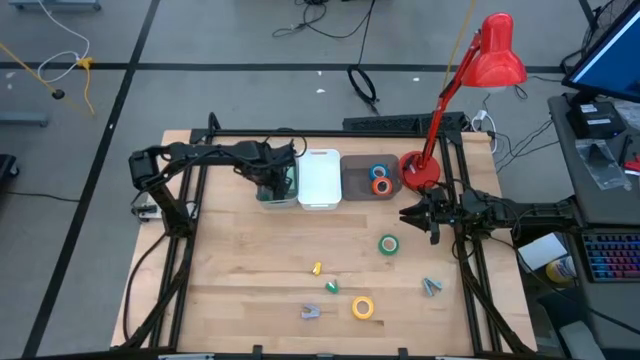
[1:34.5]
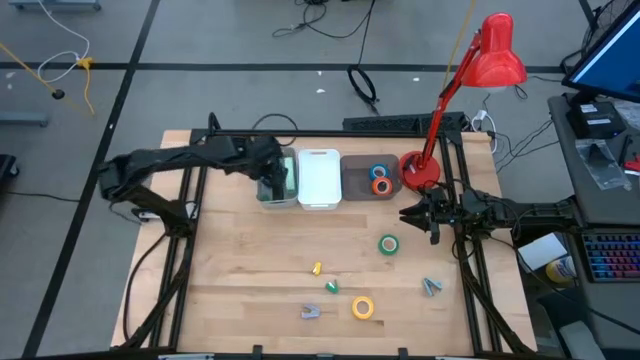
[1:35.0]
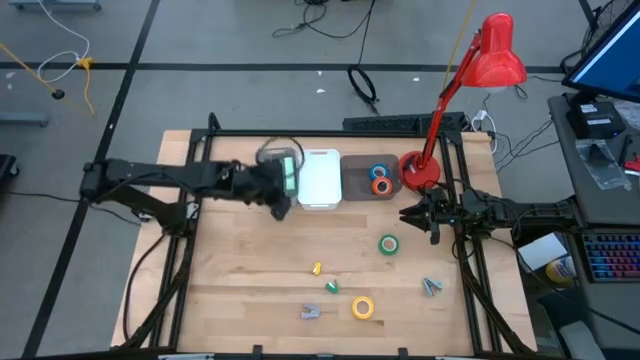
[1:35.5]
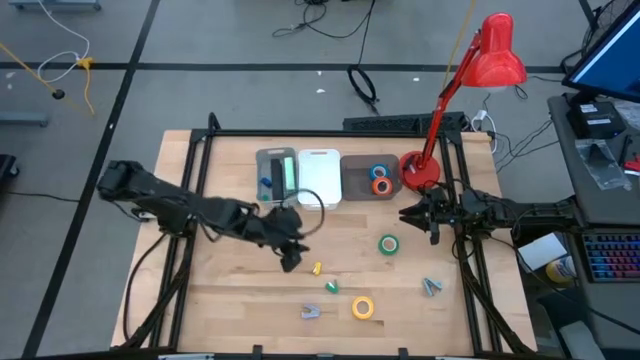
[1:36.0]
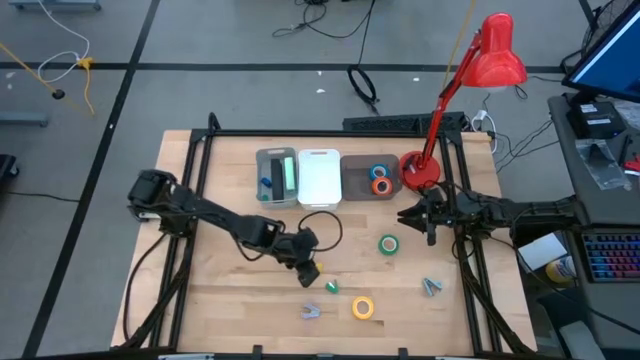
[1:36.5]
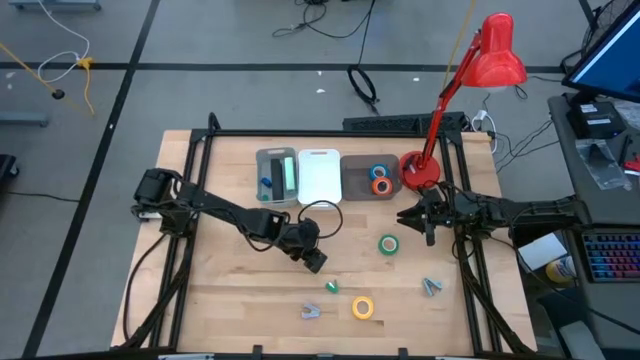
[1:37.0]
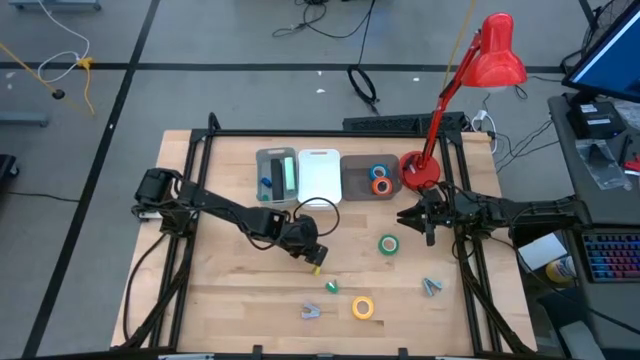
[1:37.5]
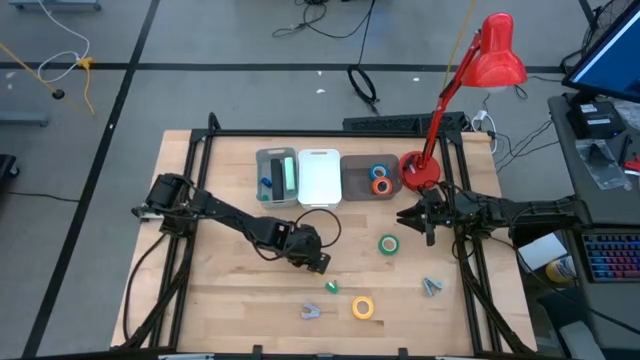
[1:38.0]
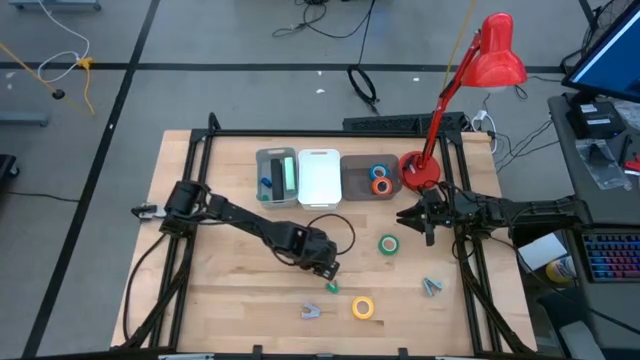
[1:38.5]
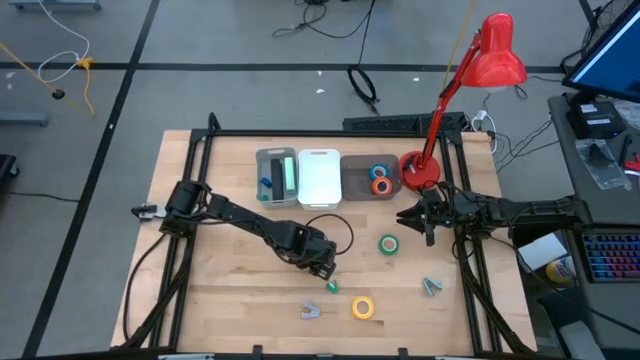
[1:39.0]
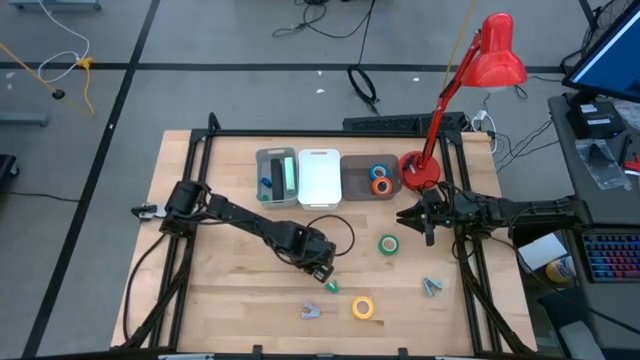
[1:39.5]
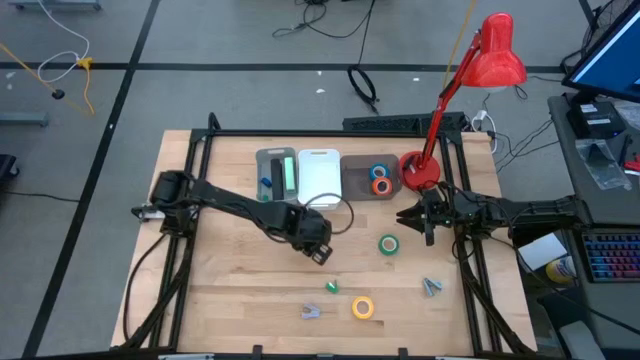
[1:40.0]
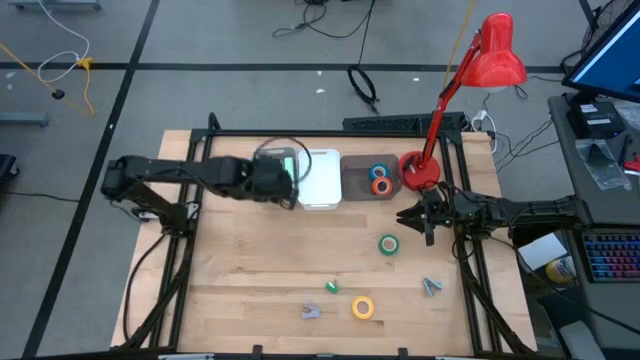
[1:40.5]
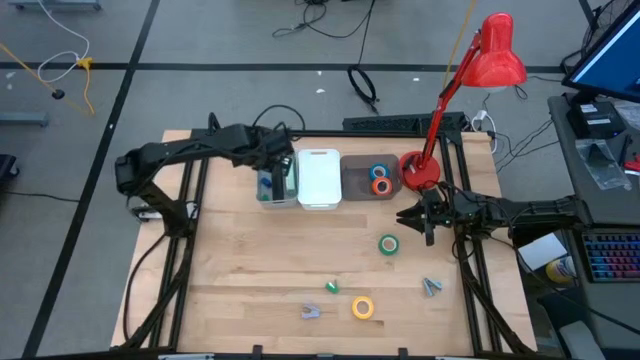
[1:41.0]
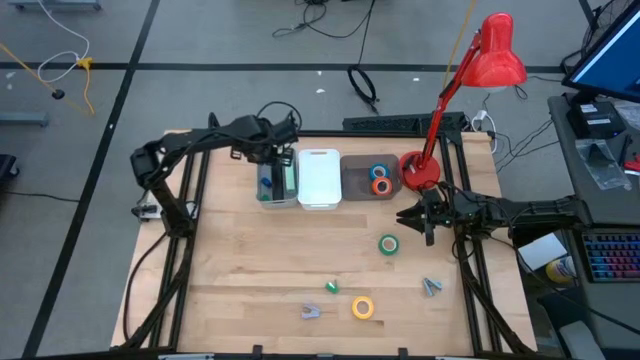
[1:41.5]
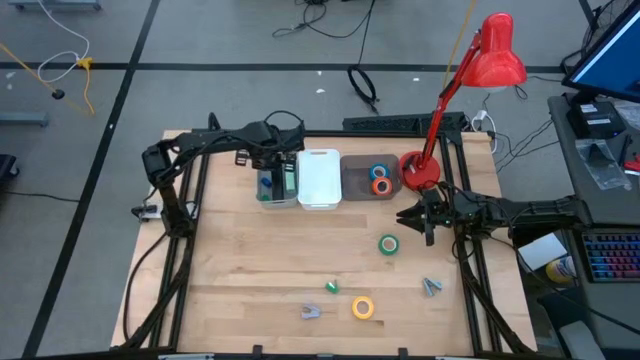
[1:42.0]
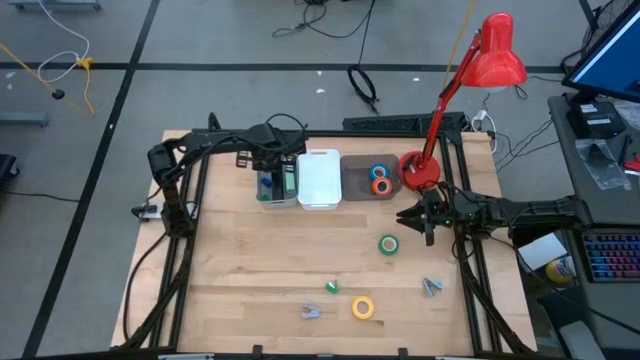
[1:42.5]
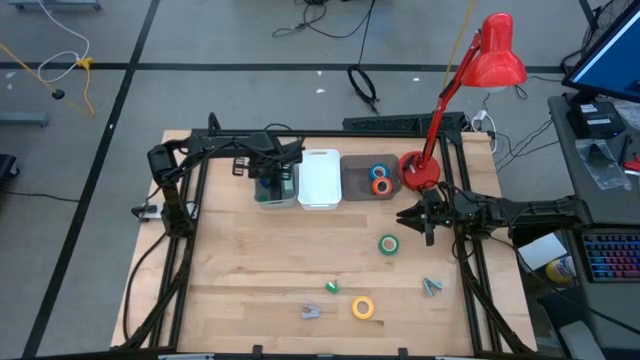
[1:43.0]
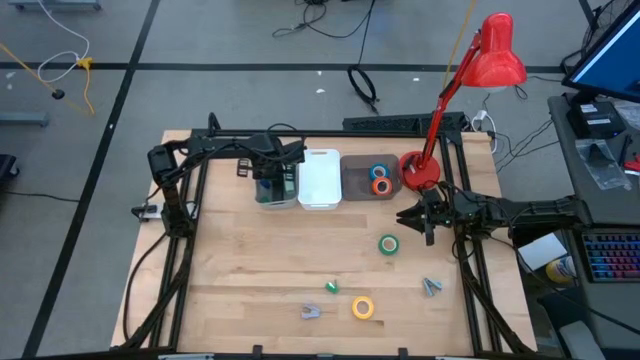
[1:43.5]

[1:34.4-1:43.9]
Task: Pick and place Stapler, Stapler remover, tape
Put the small yellow stapler into the grey bin

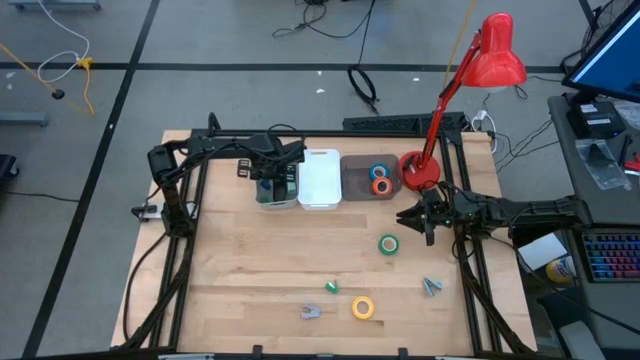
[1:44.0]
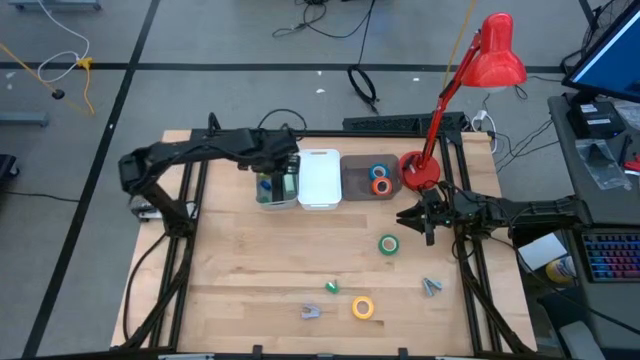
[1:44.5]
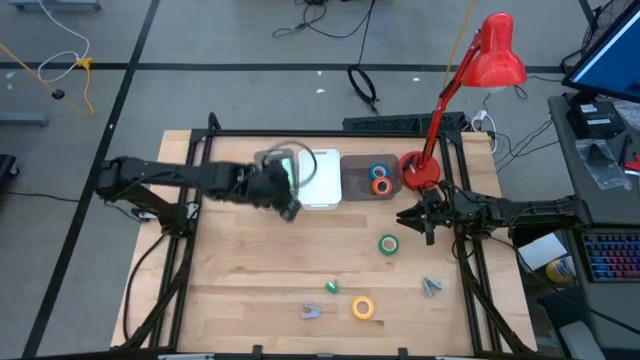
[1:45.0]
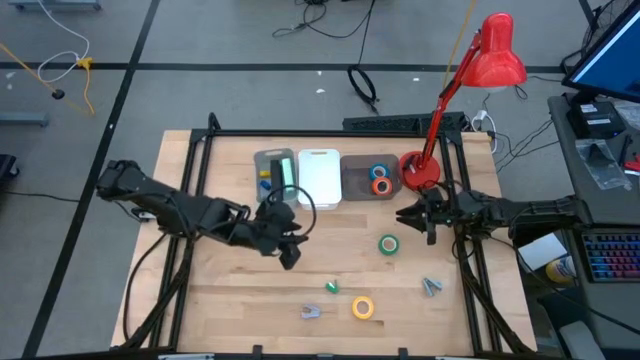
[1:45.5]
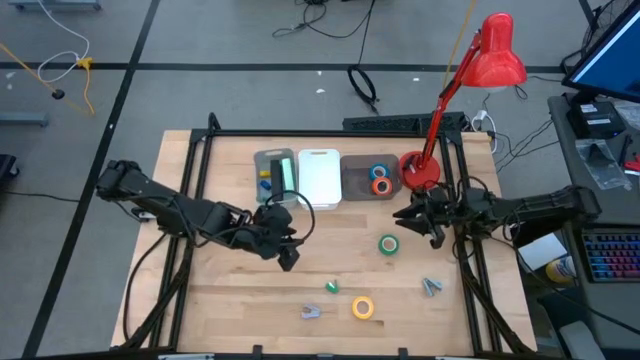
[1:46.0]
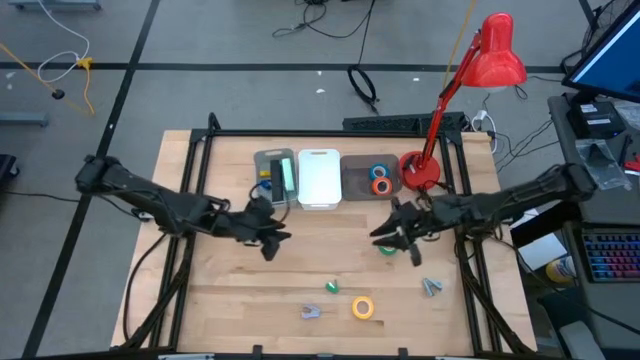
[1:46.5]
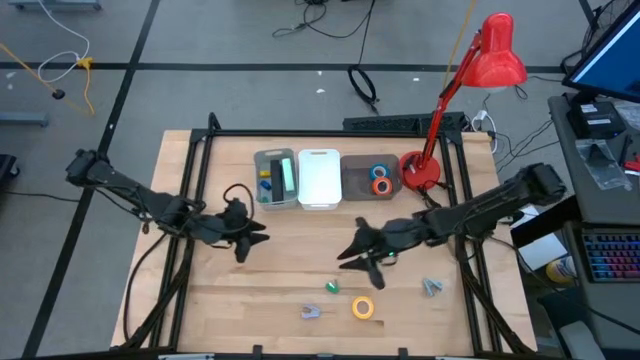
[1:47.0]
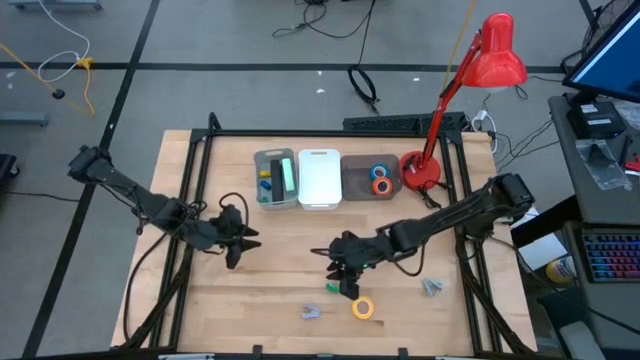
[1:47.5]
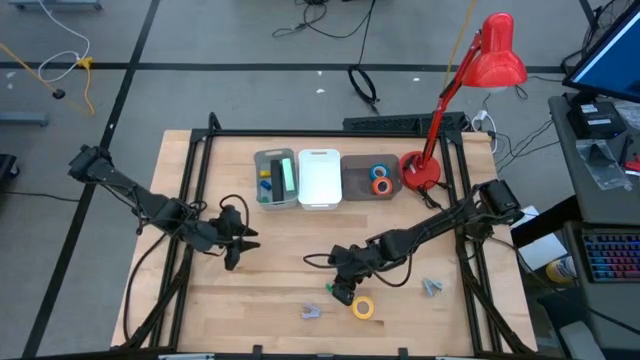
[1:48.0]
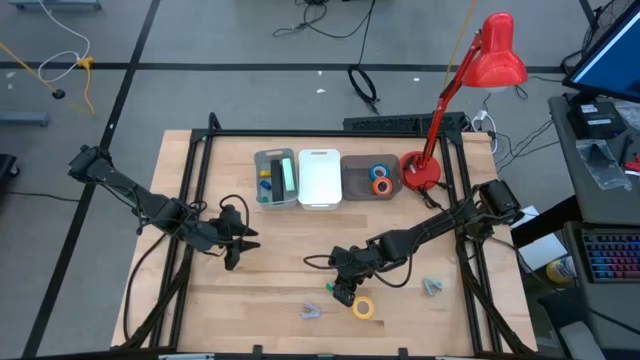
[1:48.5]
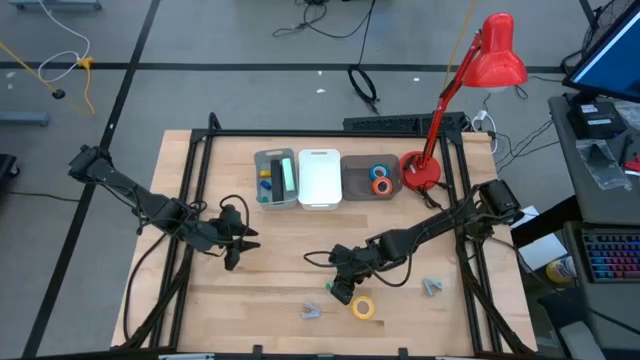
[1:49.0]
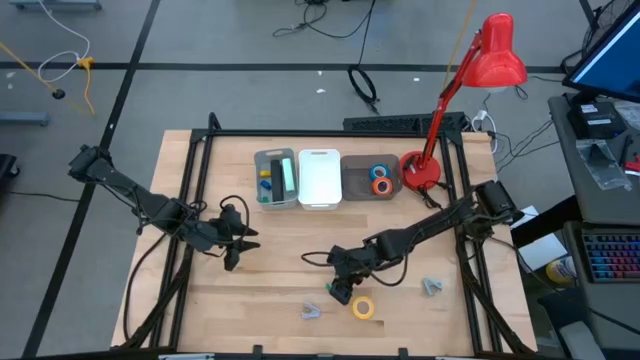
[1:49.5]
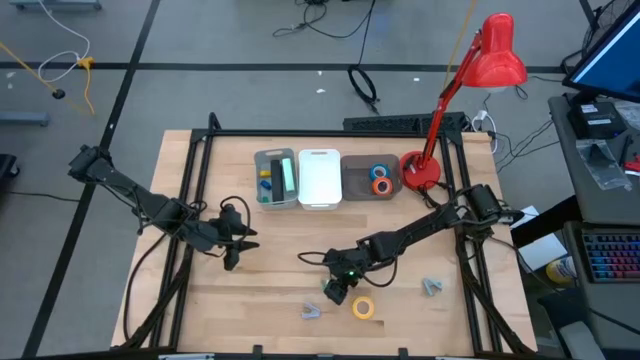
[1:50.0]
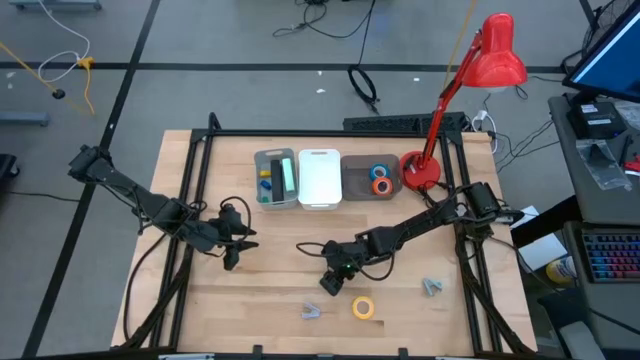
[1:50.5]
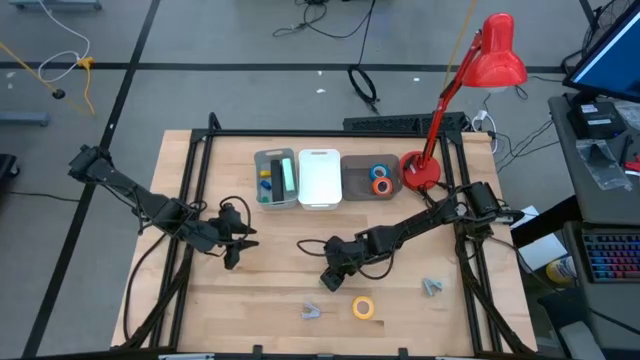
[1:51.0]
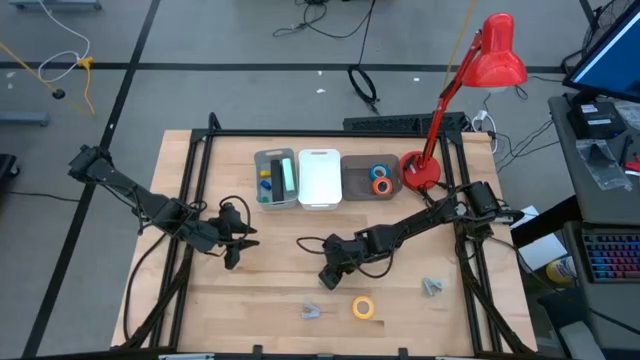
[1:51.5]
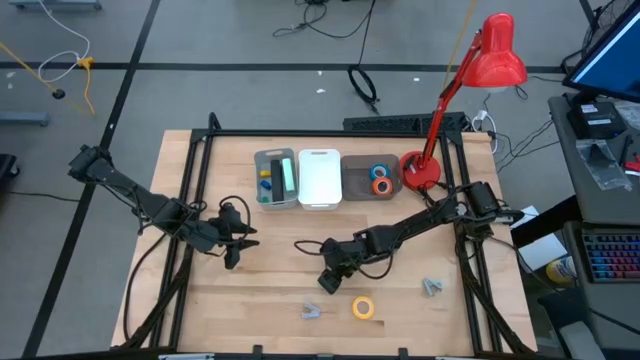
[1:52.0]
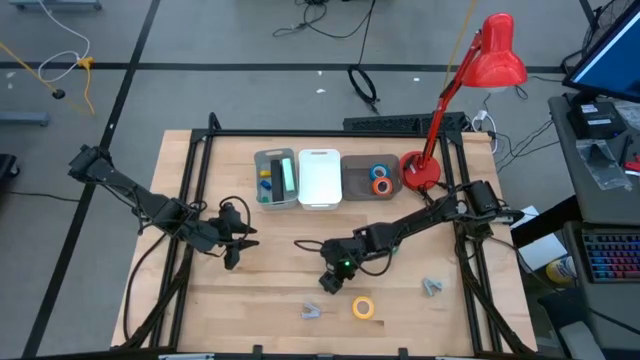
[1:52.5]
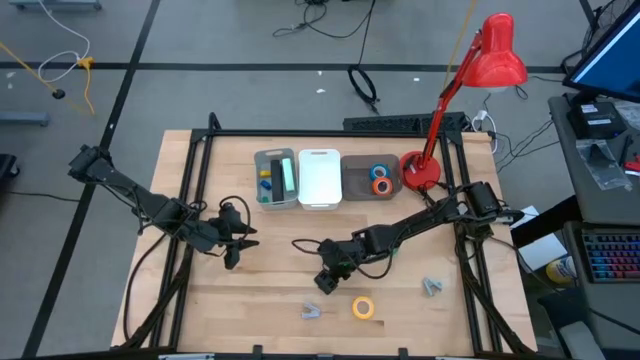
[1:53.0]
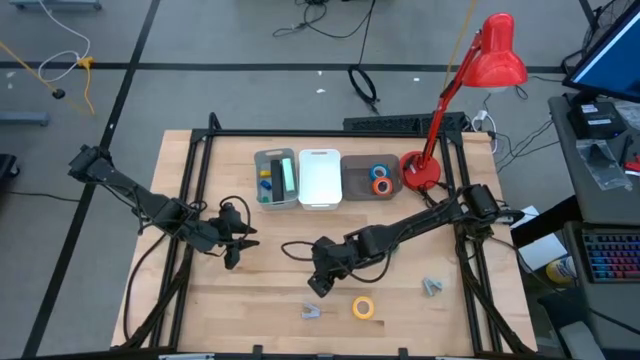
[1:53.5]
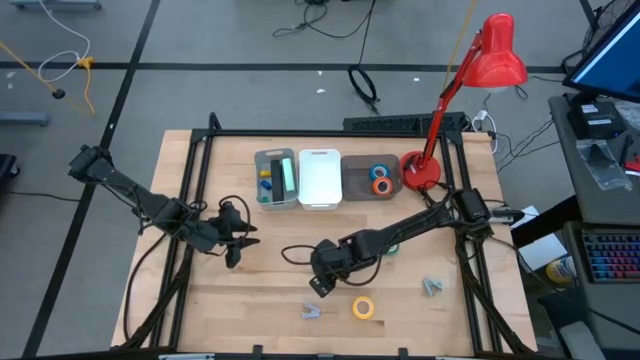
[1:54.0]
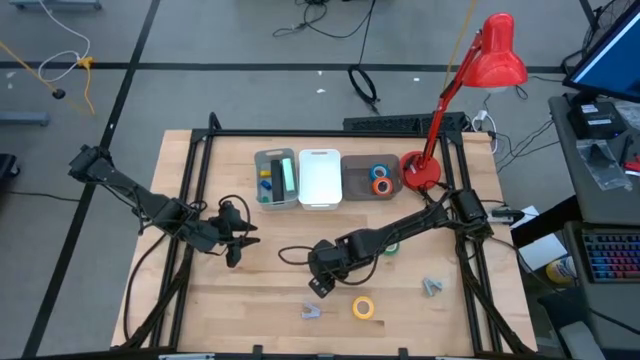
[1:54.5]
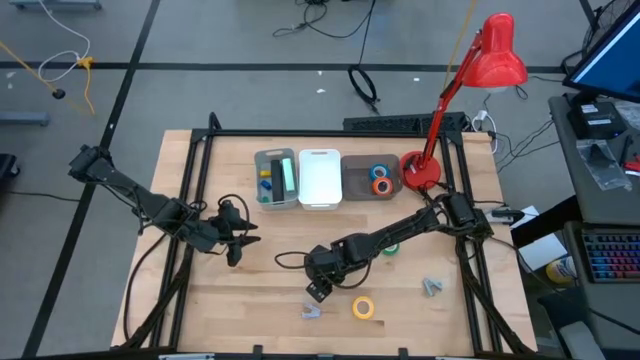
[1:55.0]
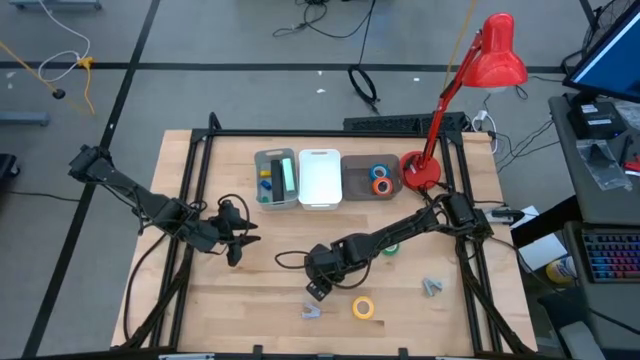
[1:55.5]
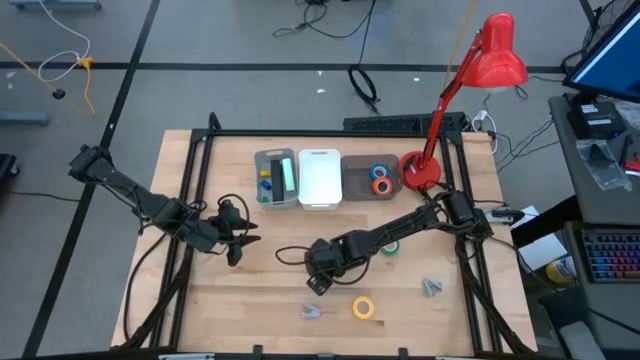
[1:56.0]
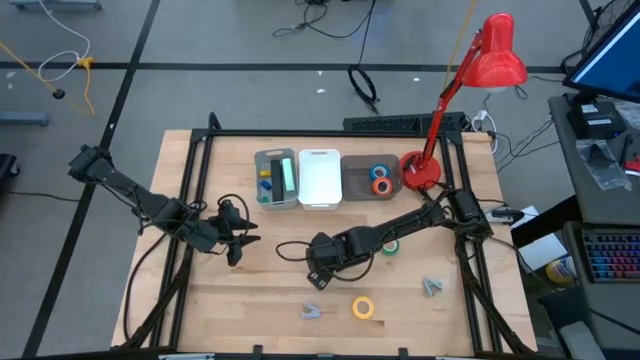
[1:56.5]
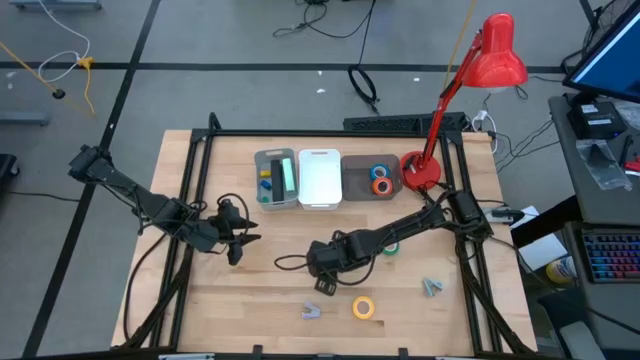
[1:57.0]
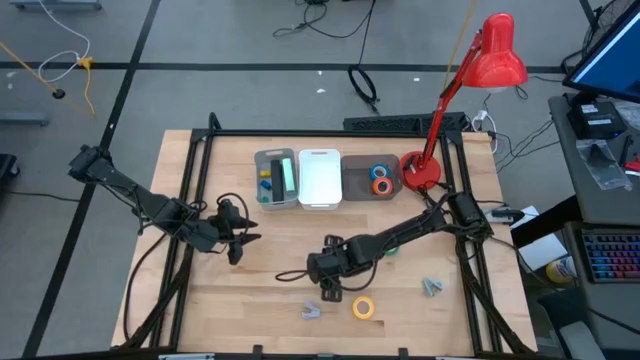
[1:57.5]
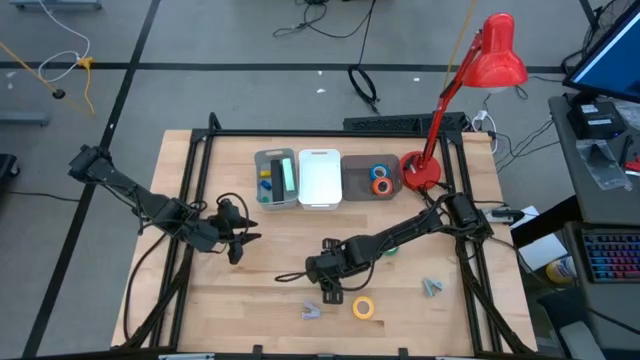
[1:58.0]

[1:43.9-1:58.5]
Put the small green stapler into the grey bin
